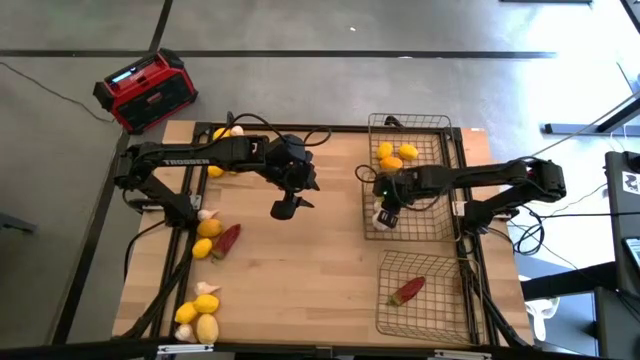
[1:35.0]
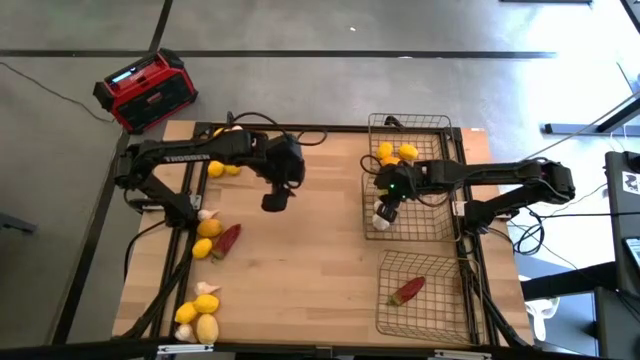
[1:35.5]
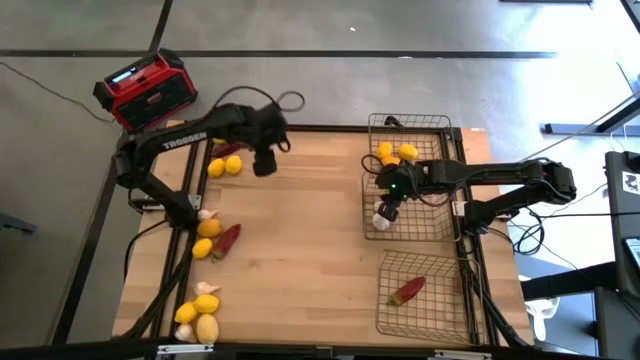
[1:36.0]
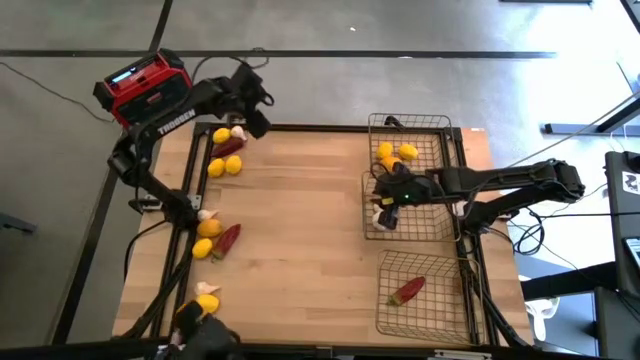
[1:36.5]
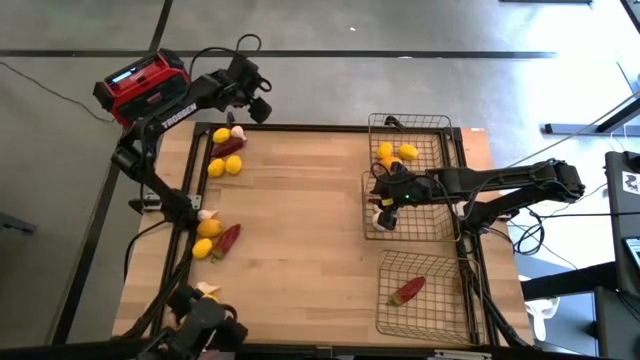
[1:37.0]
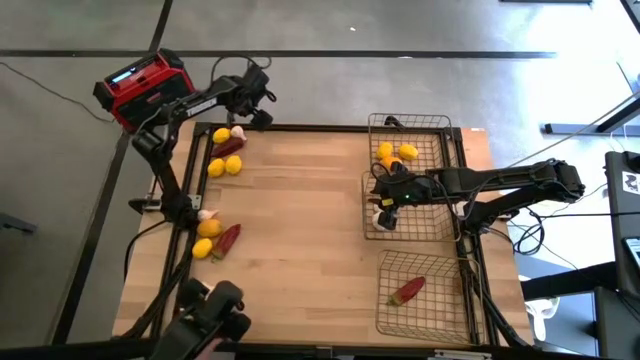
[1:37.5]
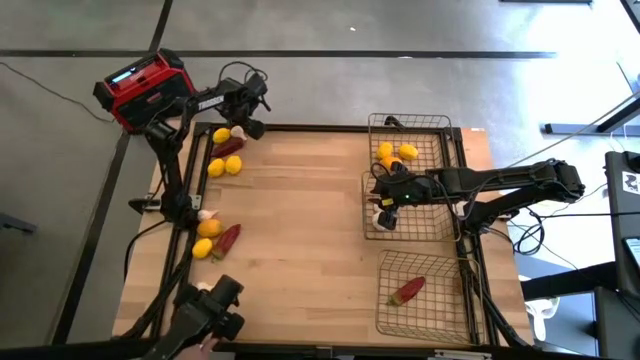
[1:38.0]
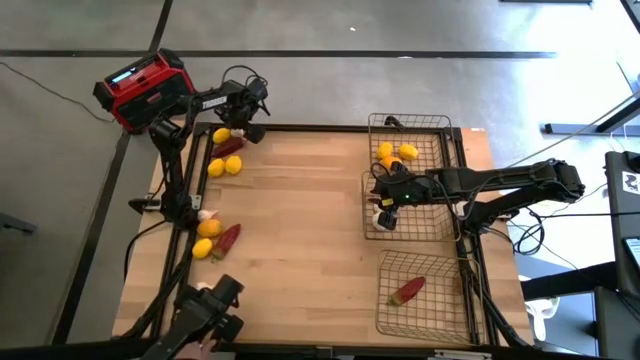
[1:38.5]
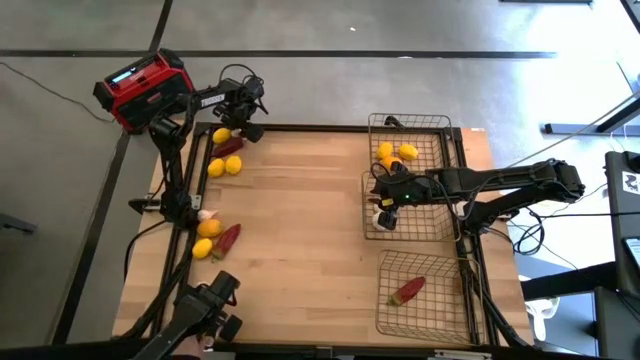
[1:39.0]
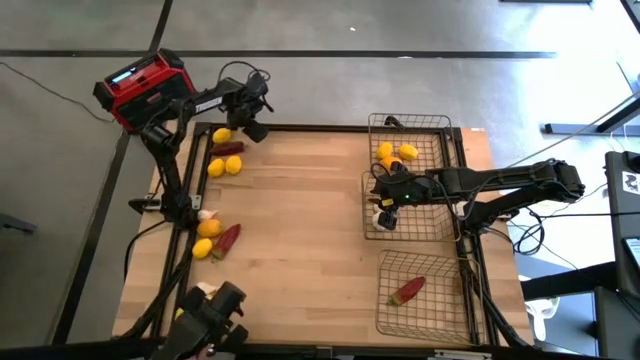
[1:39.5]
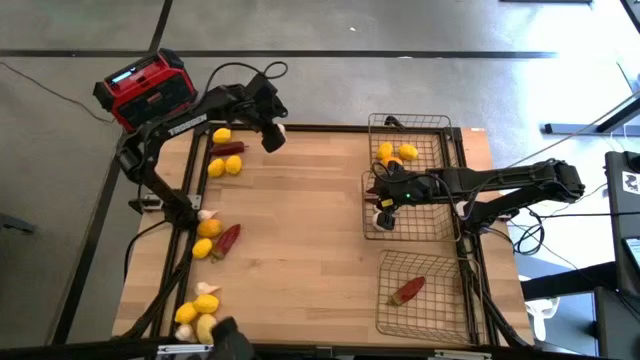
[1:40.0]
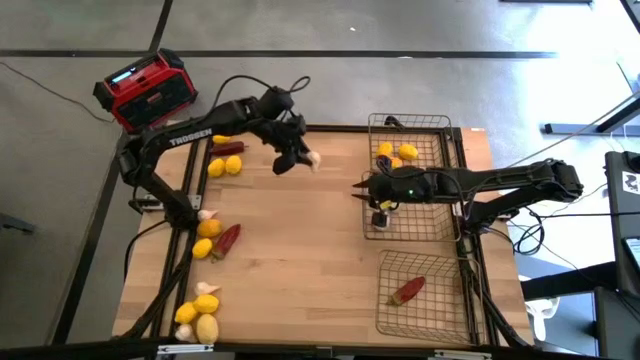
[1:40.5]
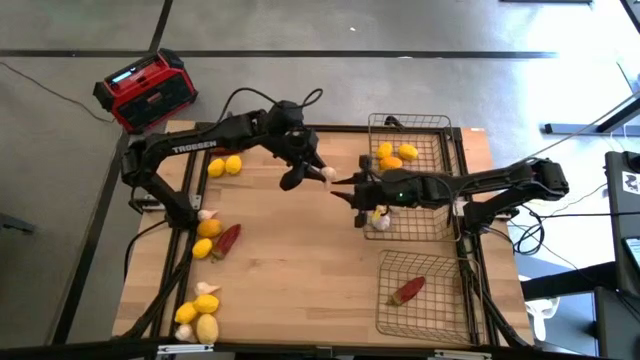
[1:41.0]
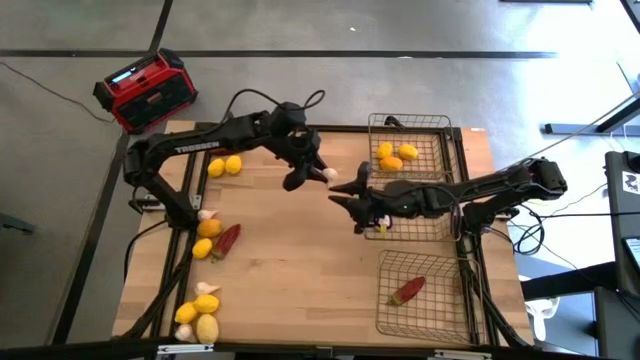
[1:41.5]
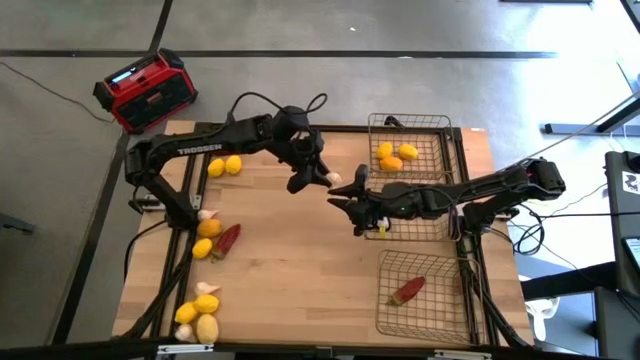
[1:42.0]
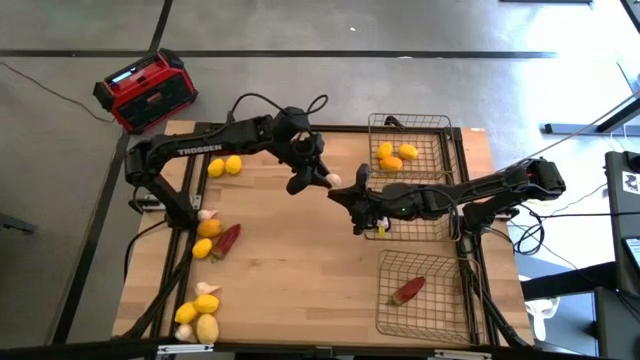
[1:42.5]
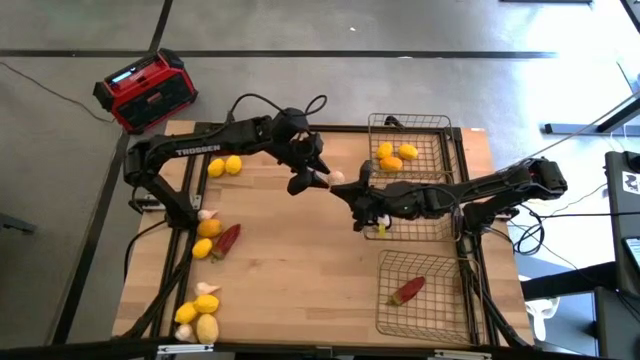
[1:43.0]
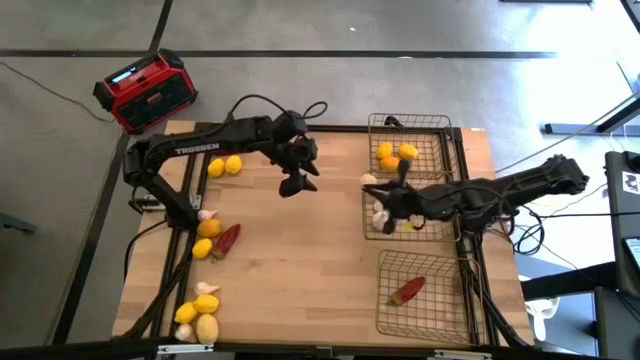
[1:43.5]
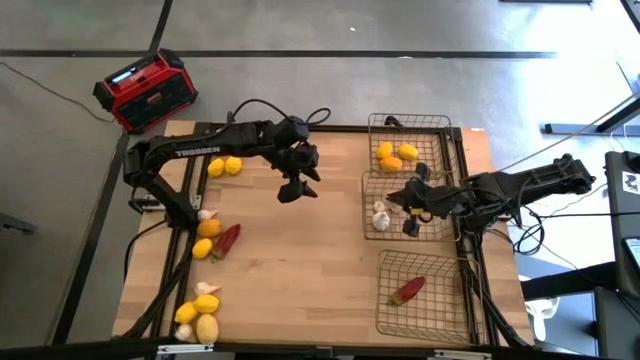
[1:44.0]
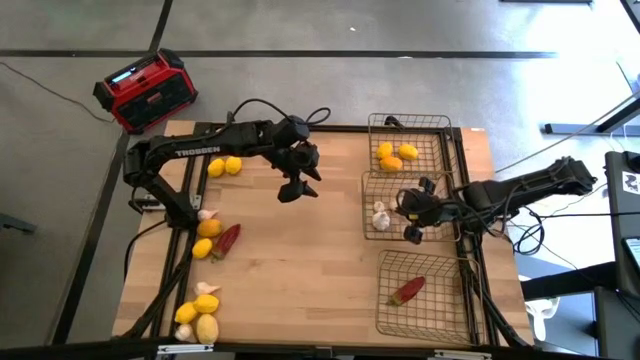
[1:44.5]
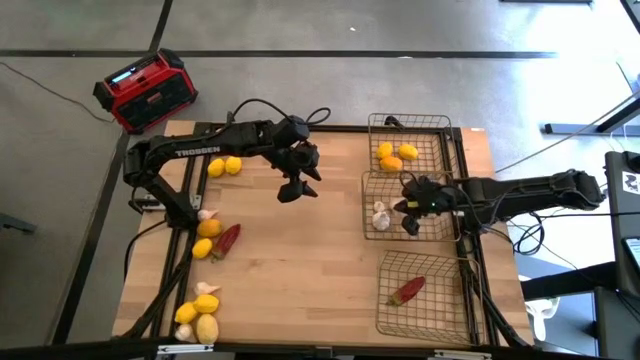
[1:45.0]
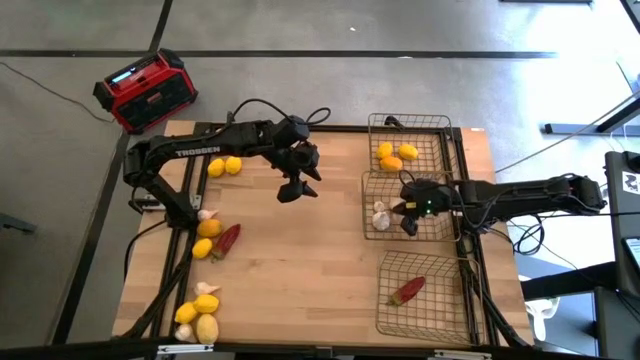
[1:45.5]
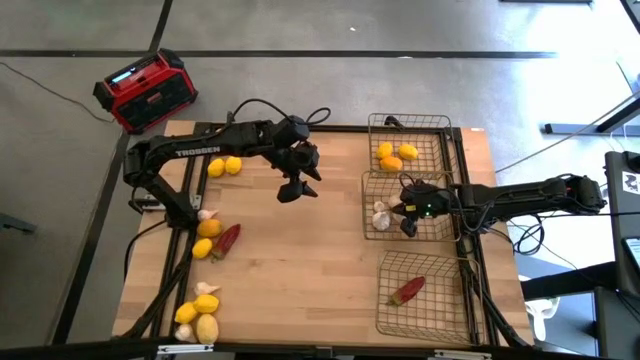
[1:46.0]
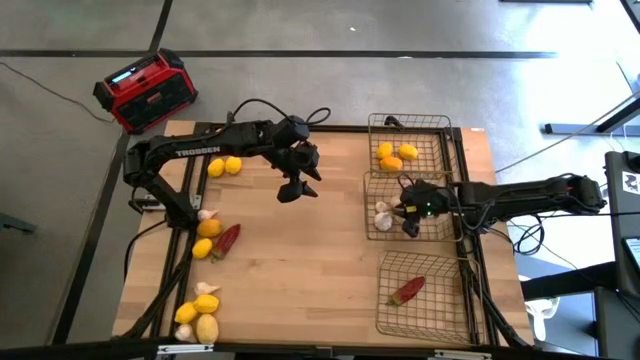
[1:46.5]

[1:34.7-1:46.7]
Task: Sort produce into baskets
Put the white garlic into the middle wire basket

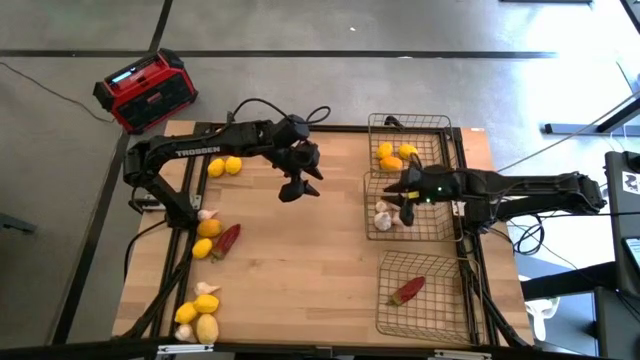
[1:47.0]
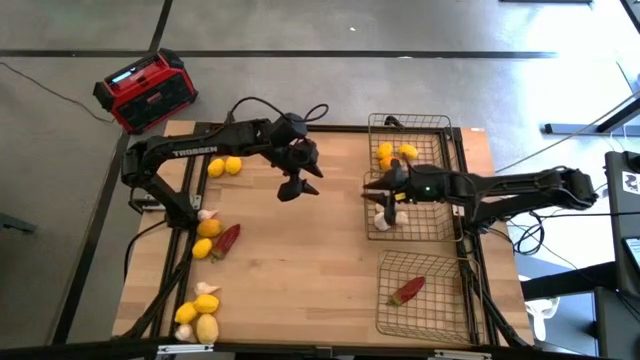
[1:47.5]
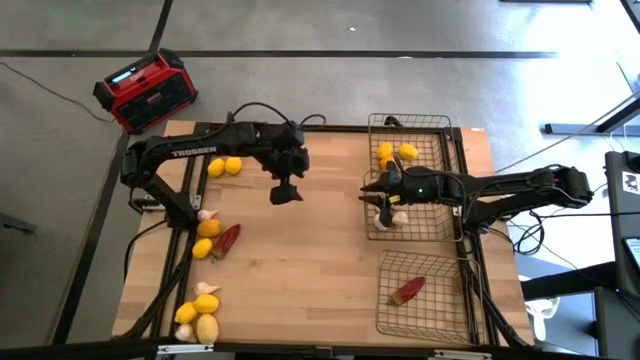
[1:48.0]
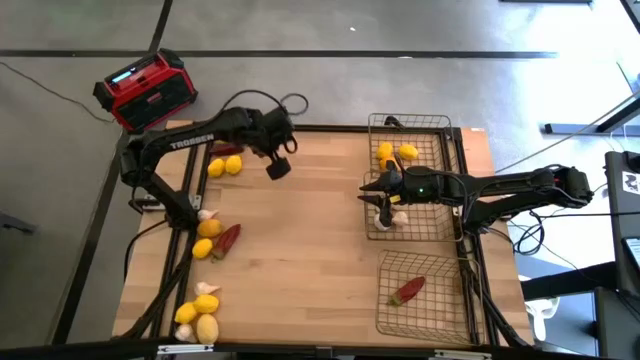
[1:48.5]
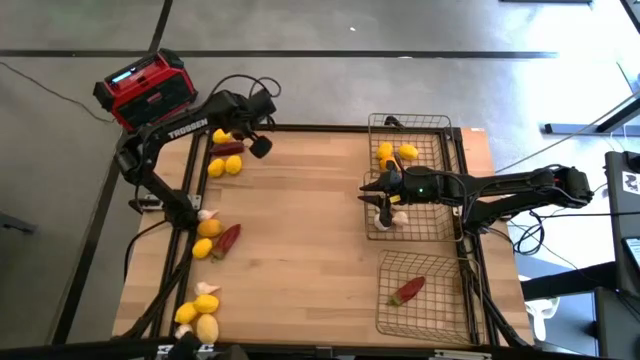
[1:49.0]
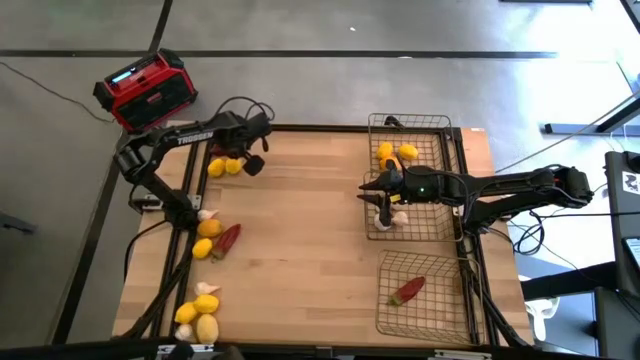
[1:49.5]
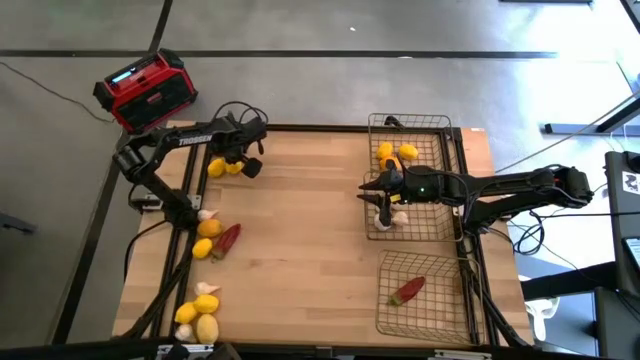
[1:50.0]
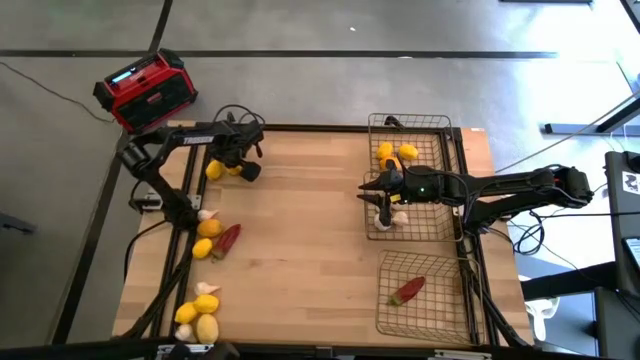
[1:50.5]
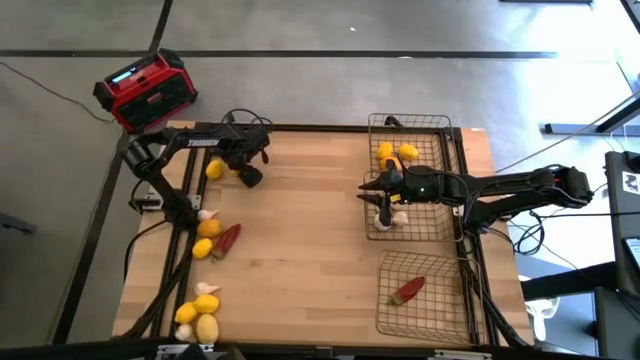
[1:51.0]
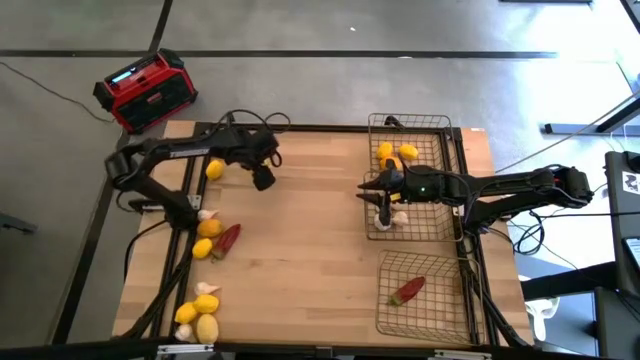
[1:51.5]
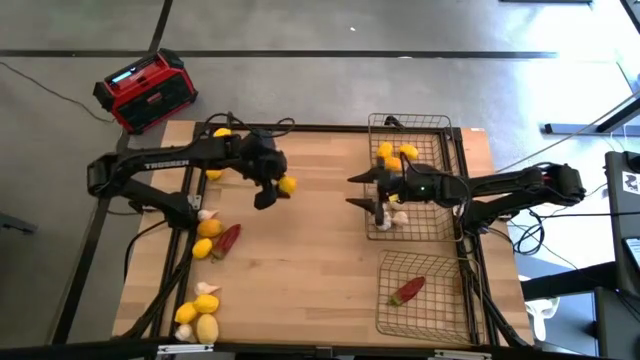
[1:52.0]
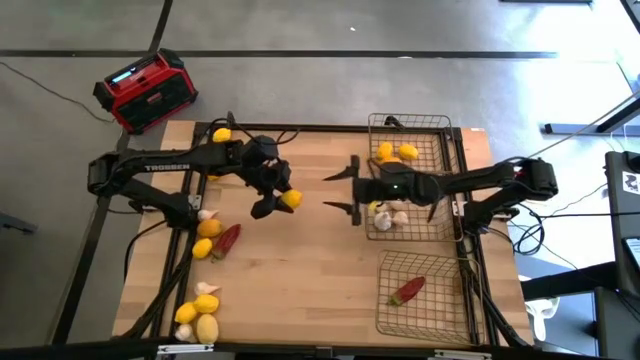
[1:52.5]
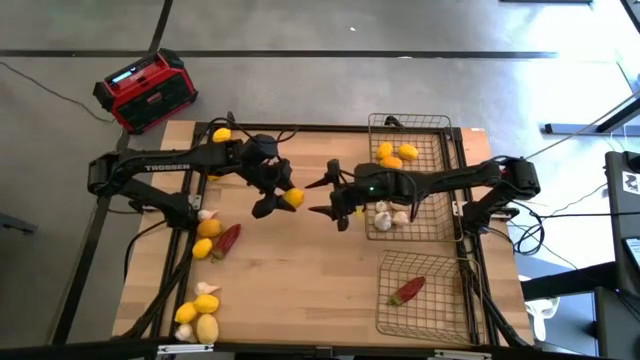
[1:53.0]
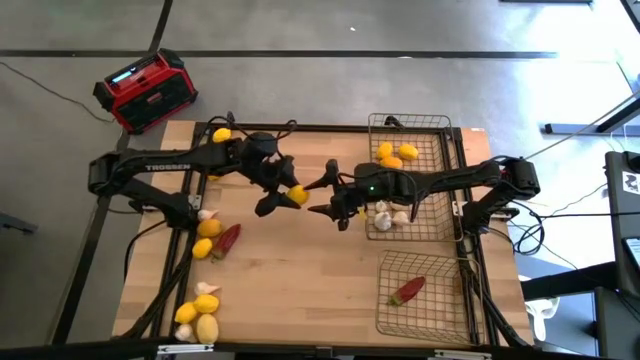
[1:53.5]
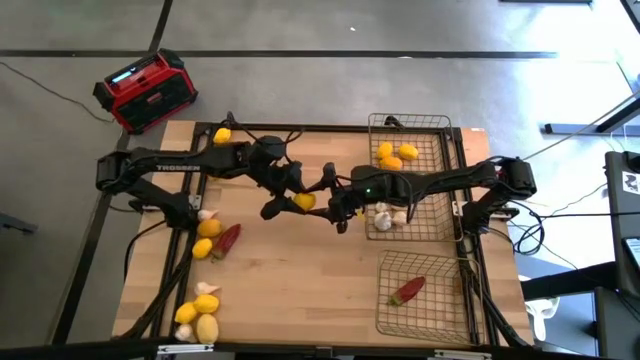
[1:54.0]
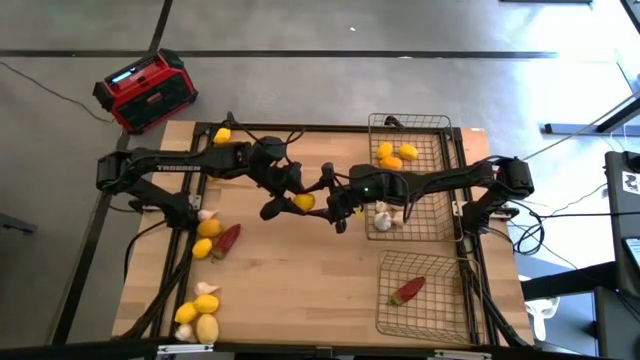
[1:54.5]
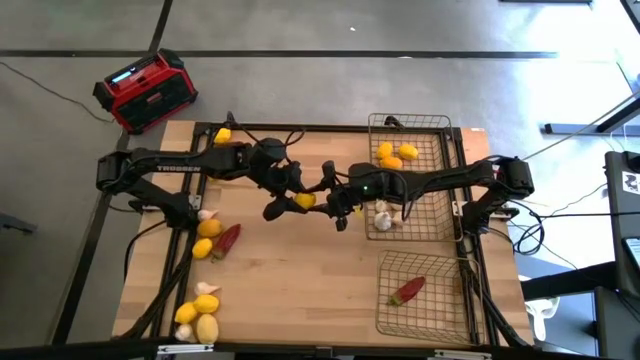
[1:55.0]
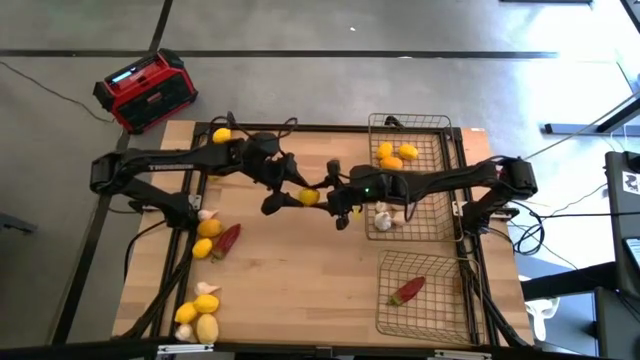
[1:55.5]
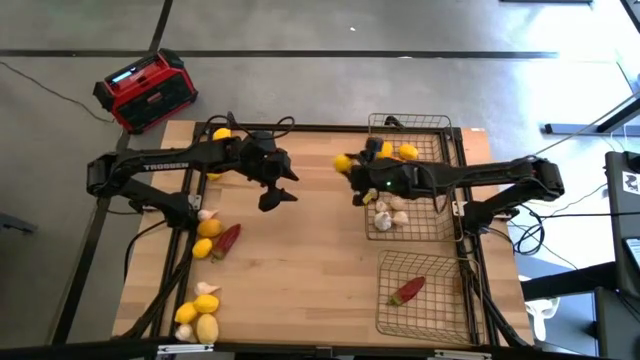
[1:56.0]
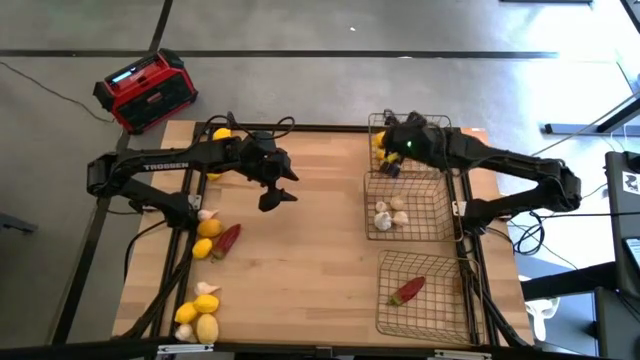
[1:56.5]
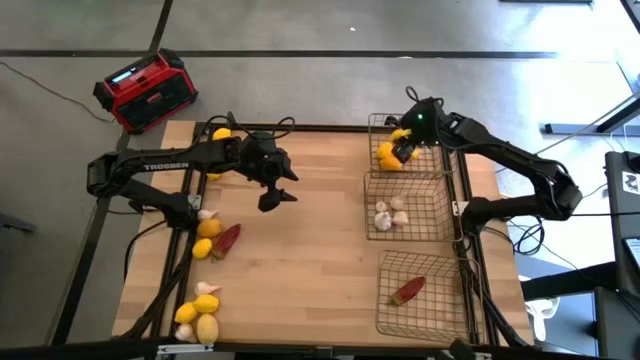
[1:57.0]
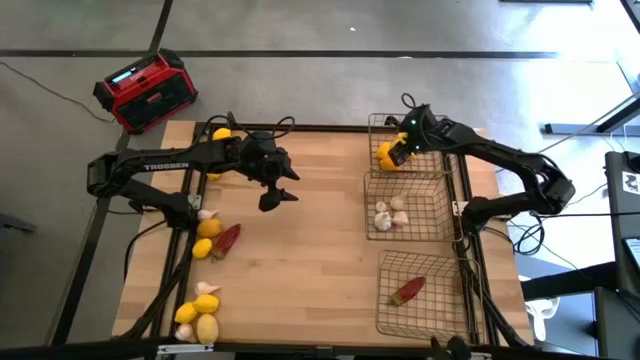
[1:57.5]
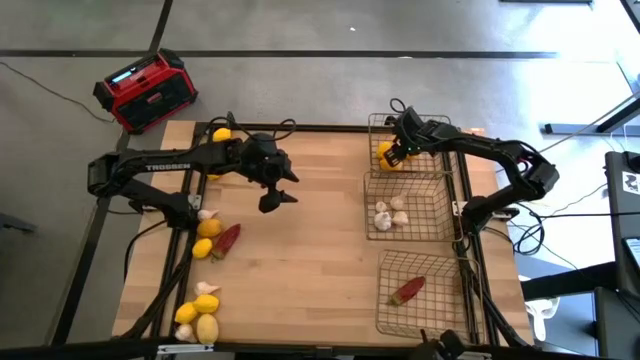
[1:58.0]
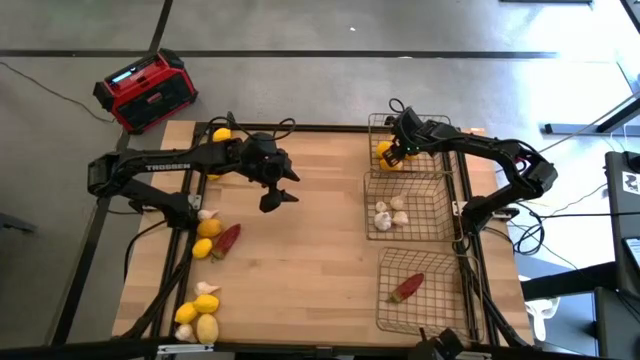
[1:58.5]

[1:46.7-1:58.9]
Put the yellow lemon into the top wire basket
